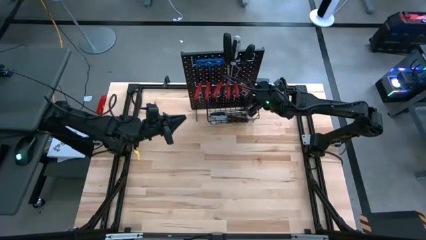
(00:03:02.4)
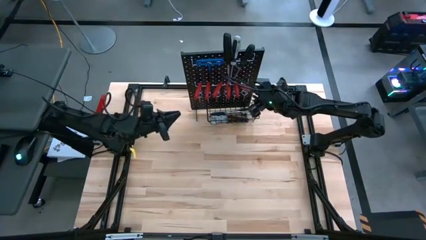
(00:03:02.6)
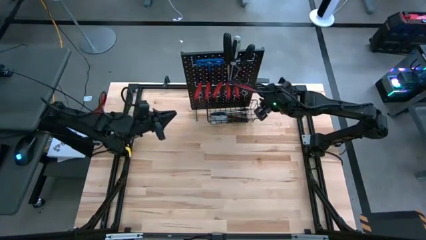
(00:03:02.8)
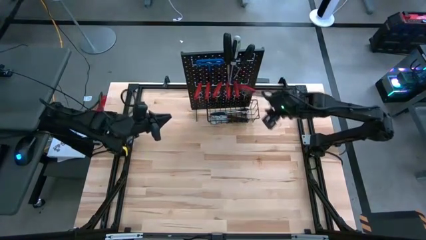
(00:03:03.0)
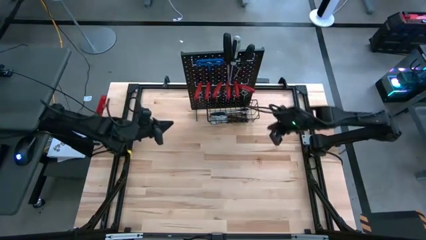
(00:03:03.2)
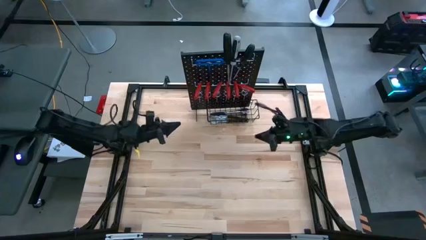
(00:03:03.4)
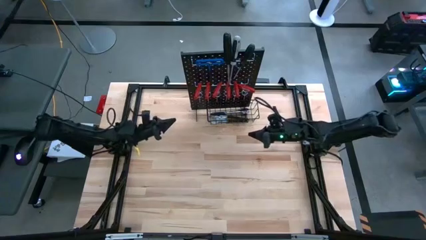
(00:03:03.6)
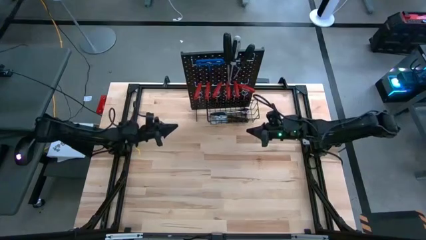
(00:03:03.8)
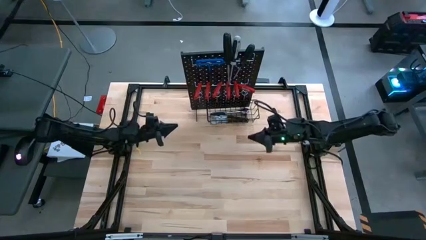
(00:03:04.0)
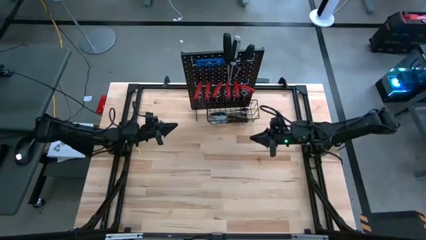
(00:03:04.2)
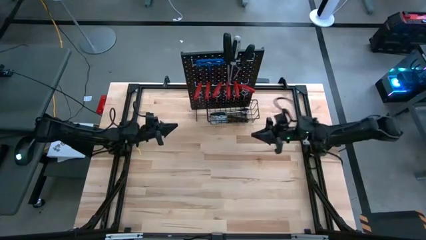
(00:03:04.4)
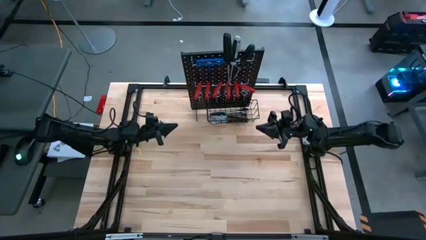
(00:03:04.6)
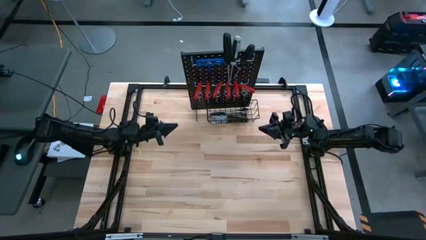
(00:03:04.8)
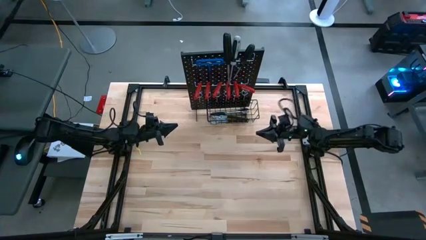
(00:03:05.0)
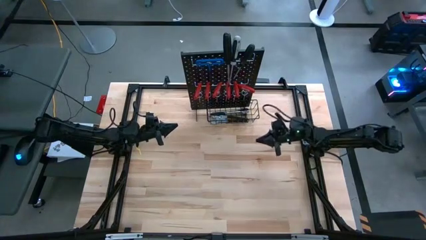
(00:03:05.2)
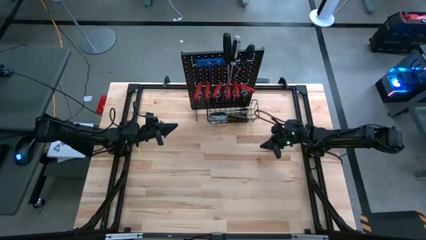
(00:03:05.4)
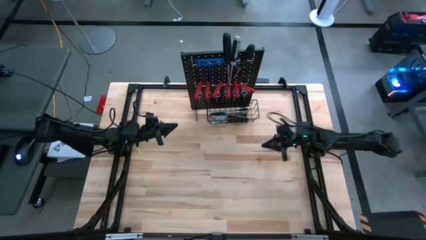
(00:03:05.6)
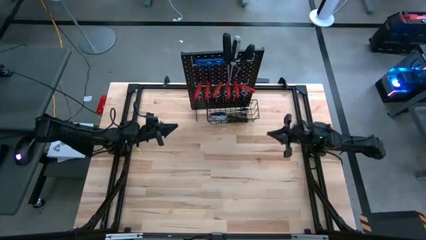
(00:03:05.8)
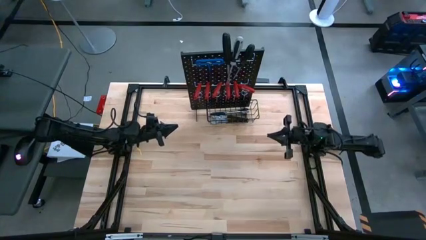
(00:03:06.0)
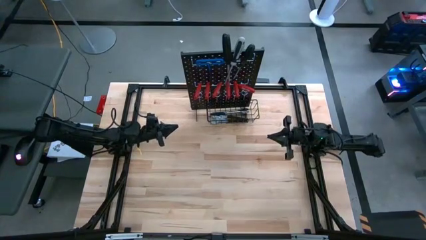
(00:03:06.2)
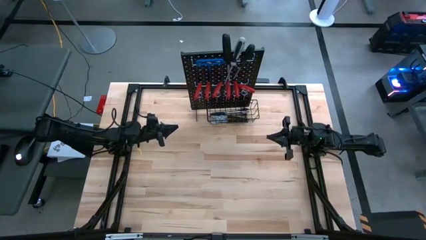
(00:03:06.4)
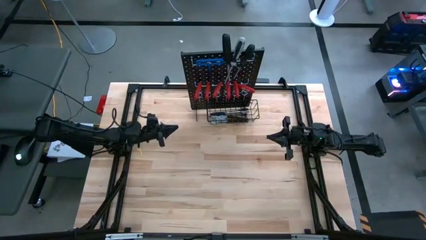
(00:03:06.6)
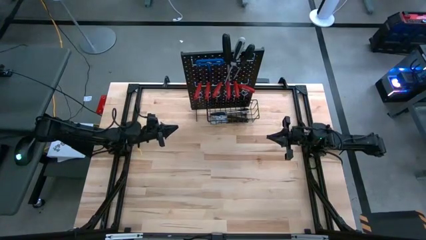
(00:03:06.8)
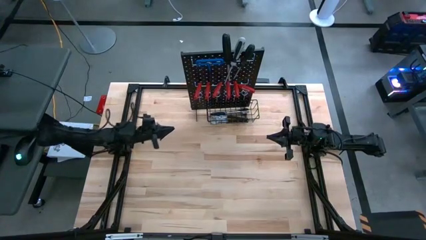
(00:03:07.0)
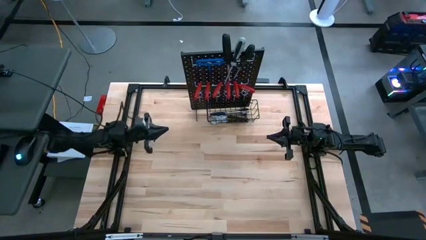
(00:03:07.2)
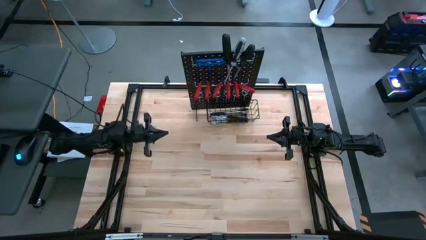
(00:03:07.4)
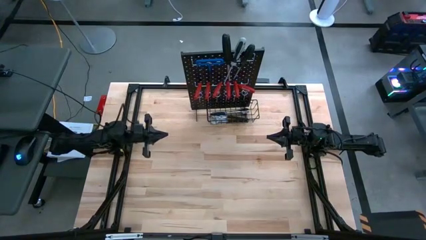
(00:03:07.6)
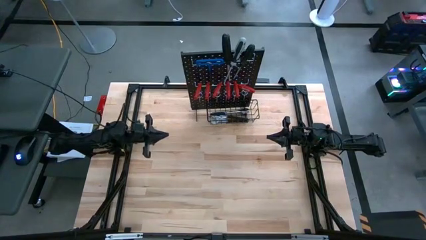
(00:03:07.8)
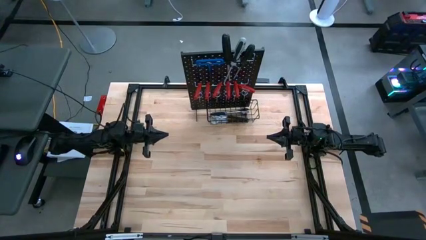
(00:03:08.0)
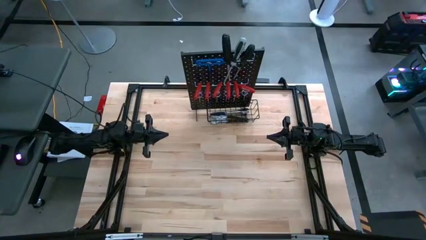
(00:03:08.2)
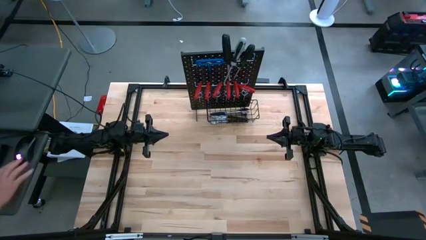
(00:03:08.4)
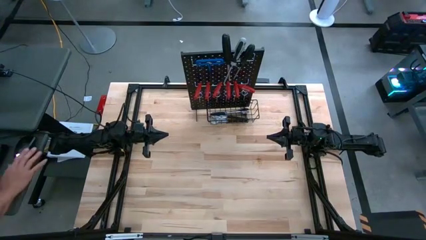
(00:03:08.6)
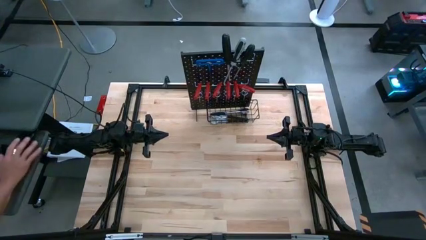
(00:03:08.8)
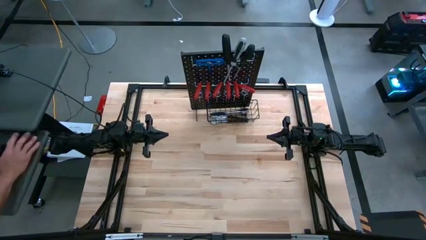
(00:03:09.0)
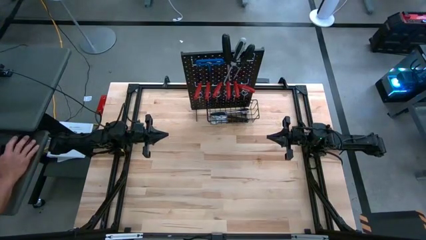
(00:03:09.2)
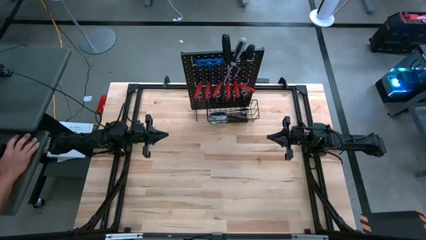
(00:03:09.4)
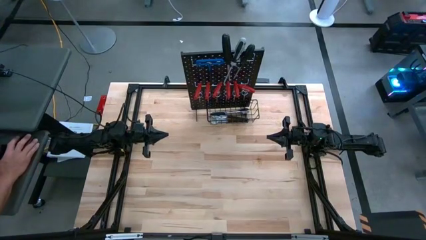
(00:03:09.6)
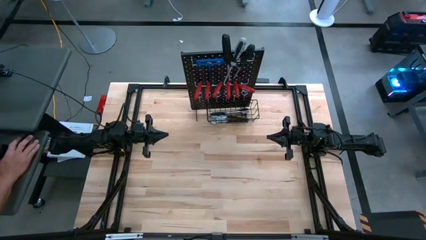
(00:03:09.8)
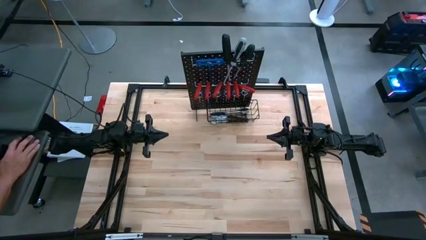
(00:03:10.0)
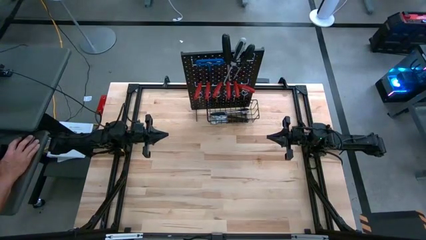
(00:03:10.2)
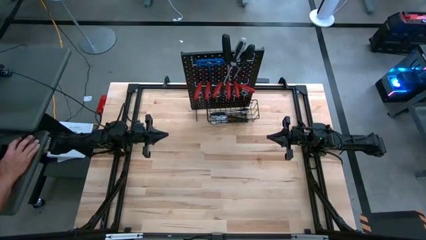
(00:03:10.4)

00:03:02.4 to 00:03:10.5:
Task: Hang tools onto peg board
Return to Home Position

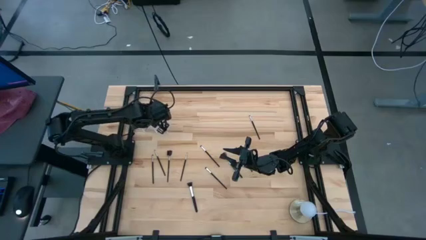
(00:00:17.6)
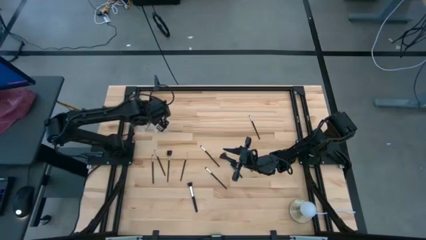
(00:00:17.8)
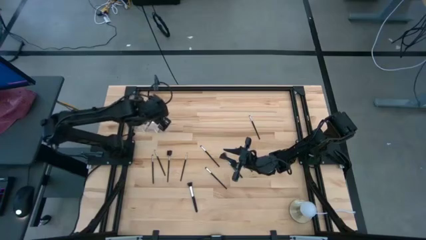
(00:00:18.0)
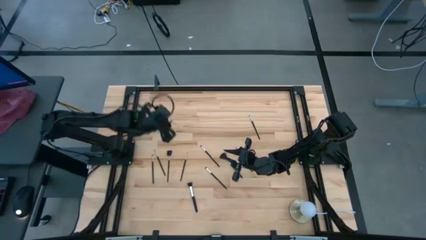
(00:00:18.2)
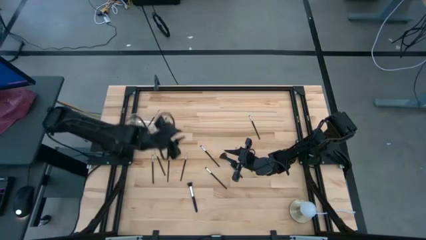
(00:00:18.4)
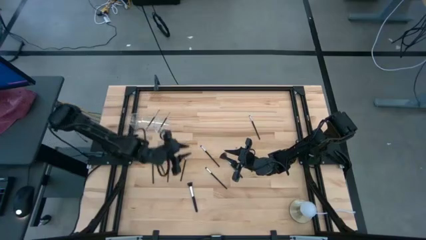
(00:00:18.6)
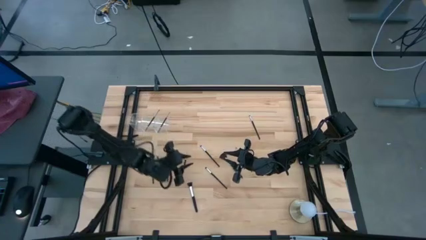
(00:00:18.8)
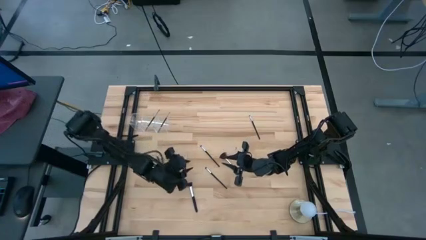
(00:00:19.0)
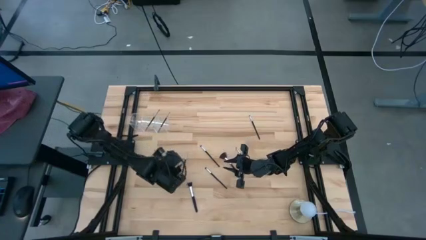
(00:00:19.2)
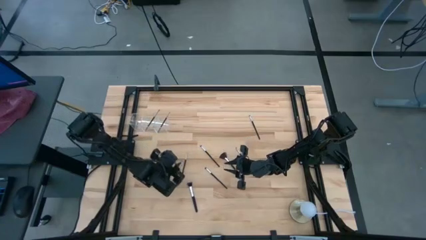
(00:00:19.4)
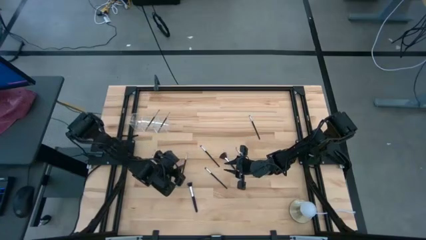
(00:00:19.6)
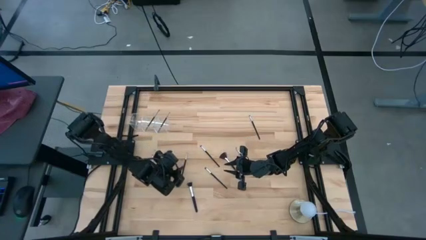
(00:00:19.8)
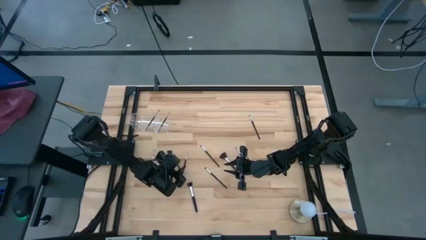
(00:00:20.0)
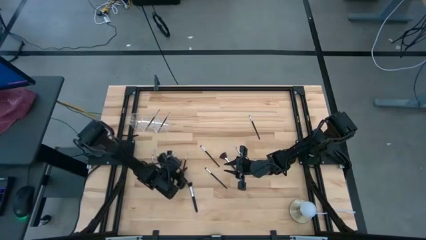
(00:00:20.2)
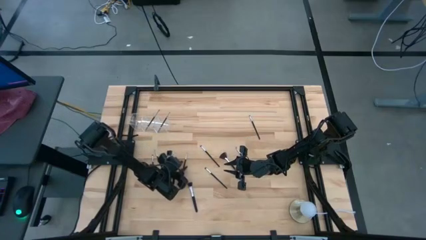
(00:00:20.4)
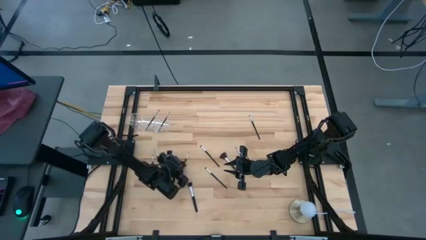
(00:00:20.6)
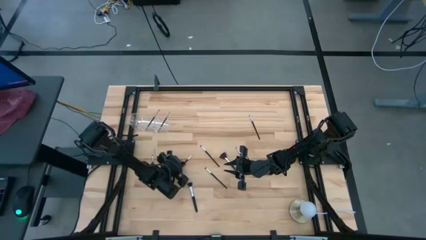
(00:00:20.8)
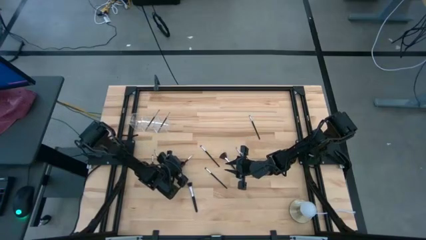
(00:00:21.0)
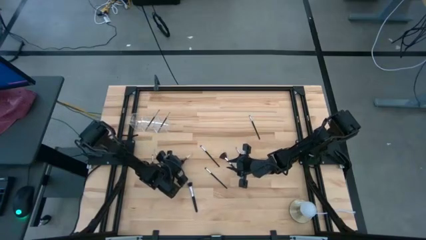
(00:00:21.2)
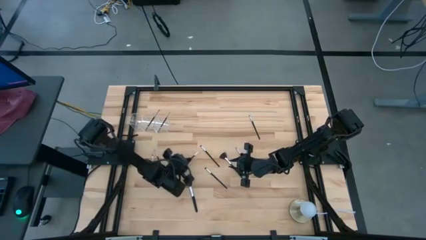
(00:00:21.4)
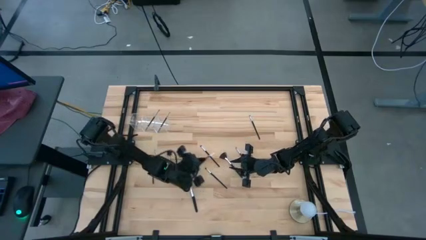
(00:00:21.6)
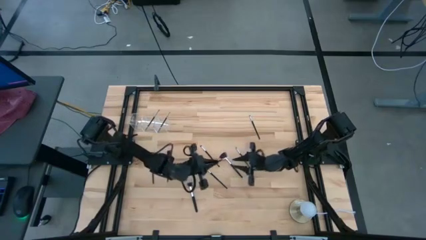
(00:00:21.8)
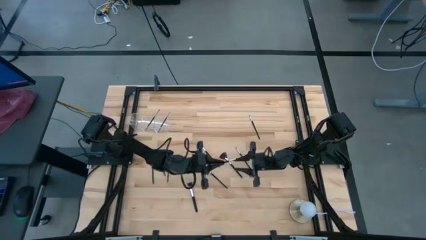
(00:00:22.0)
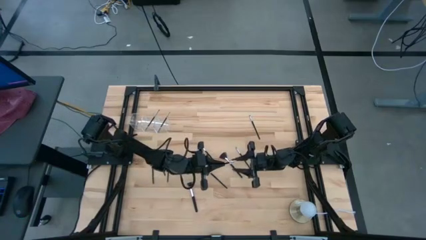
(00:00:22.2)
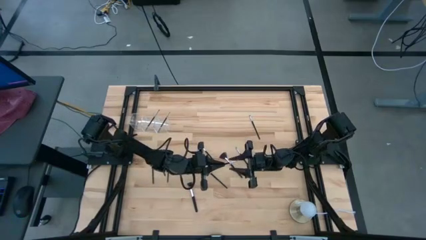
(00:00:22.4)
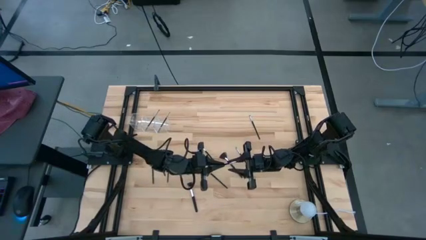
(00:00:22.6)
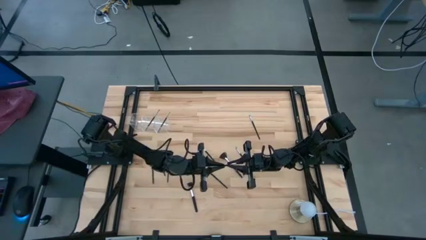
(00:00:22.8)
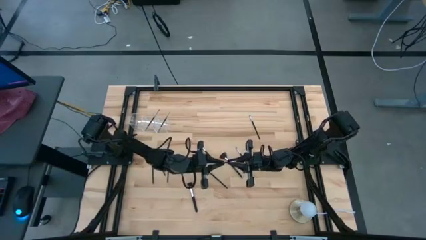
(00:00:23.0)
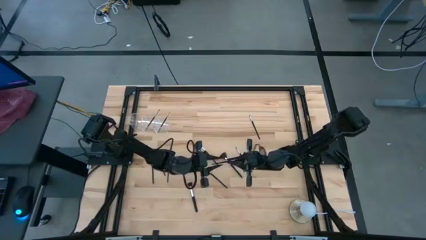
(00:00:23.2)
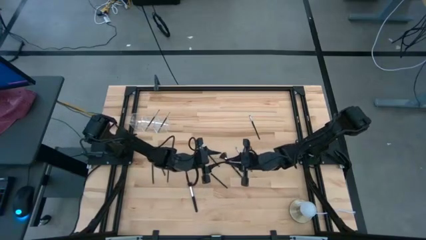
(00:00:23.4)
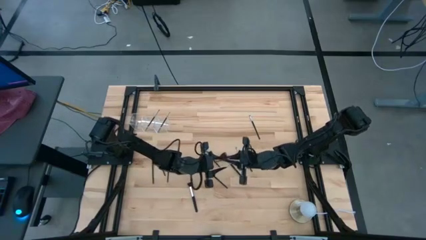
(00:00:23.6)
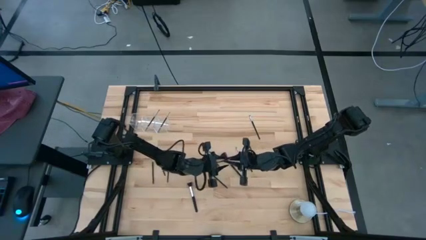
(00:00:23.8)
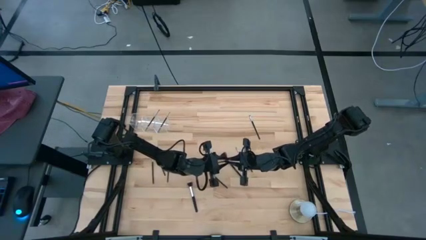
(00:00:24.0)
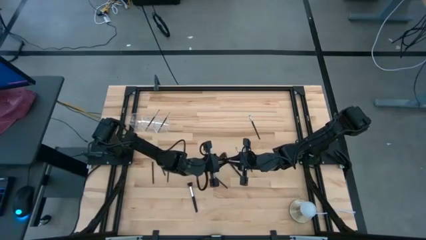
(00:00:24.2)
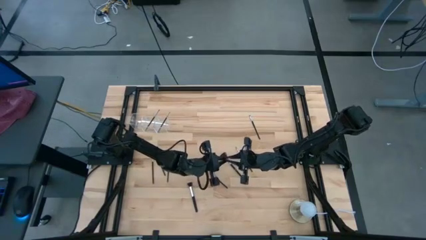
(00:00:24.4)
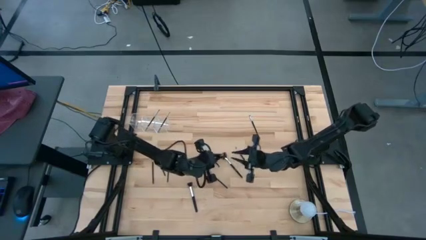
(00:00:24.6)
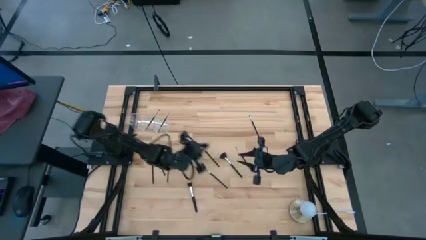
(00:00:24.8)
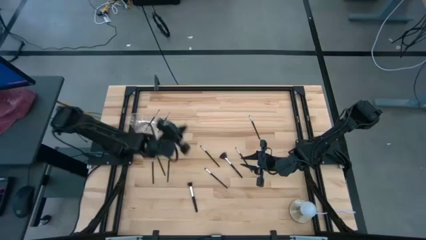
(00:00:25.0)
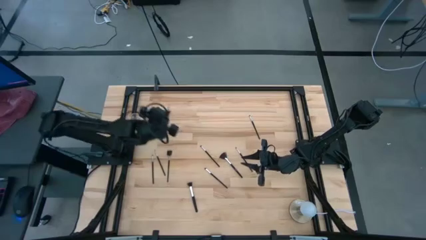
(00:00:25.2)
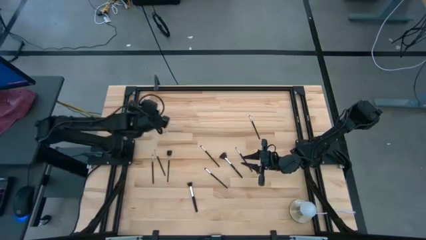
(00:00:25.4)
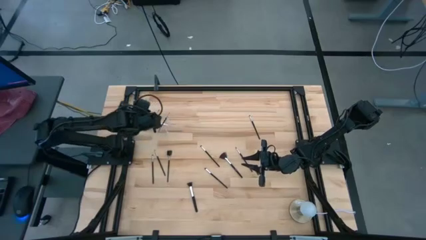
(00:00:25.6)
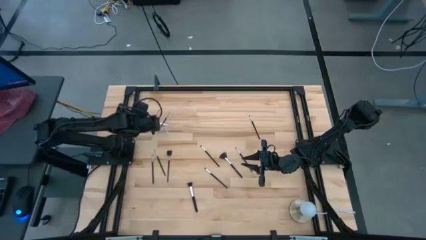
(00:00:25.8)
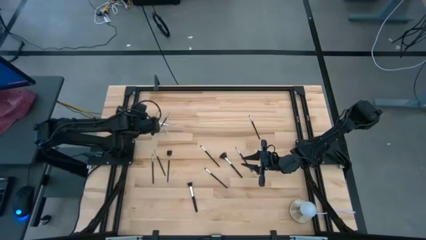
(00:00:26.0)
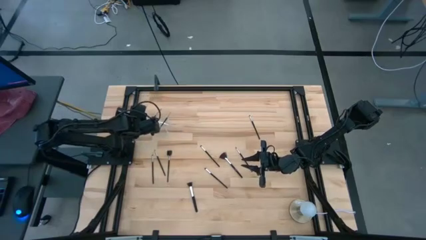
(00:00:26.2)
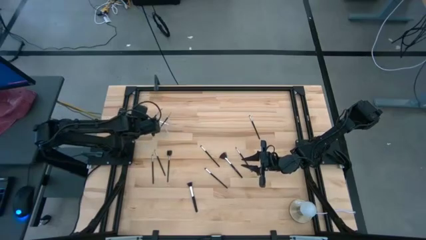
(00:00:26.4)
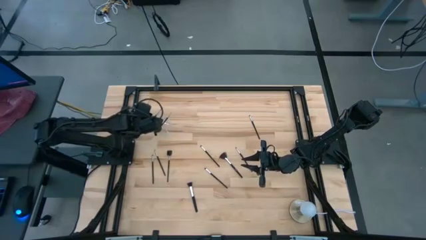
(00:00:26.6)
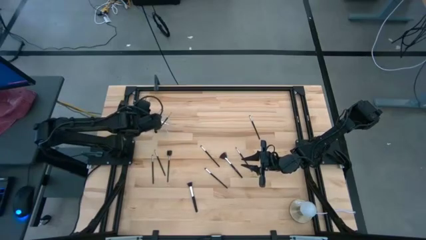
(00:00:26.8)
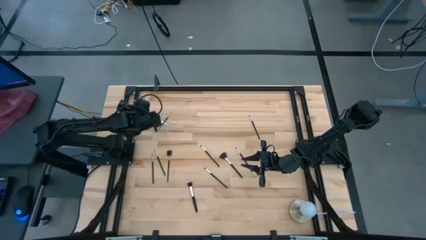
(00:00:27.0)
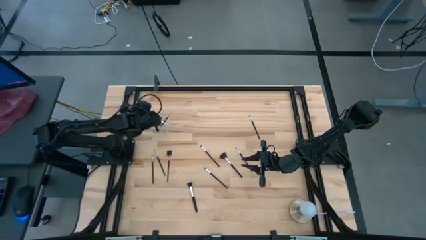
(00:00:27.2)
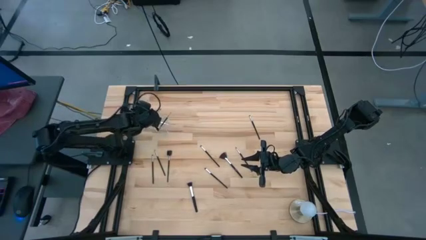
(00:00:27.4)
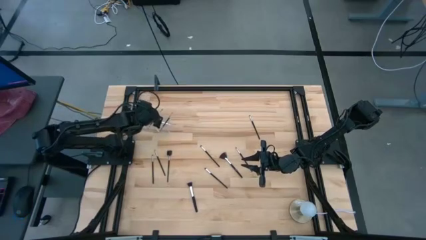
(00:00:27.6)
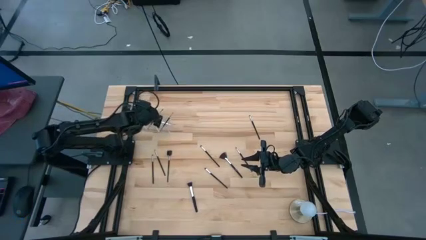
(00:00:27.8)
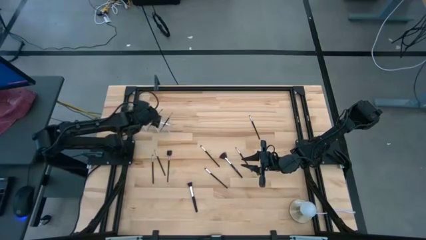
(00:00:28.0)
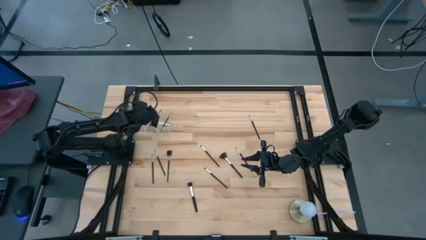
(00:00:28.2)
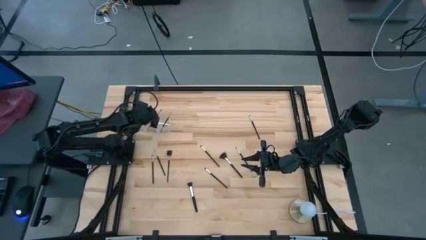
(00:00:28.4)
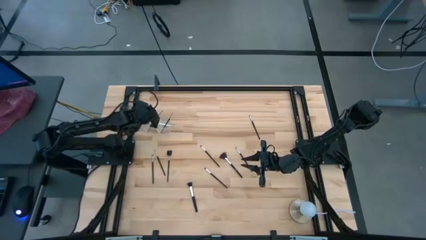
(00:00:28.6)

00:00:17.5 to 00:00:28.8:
Task: Put items in baskets/containers
Put the liner brush into the transparent organizer
